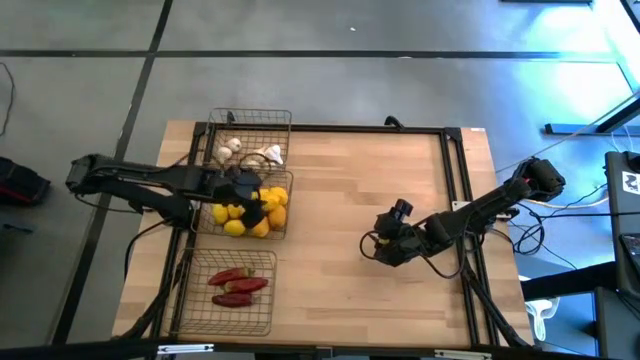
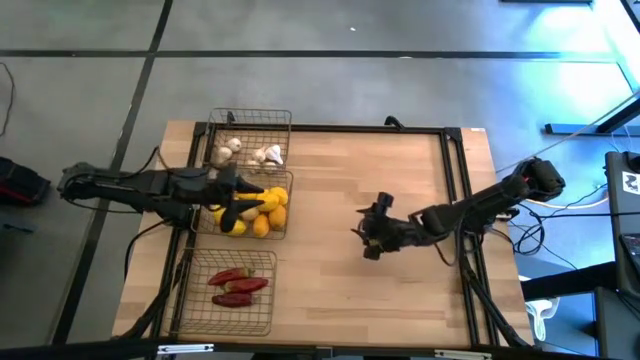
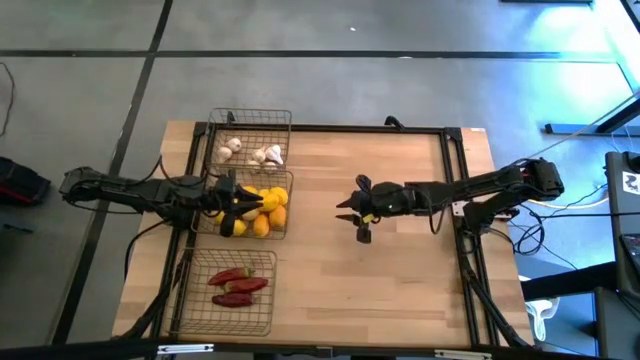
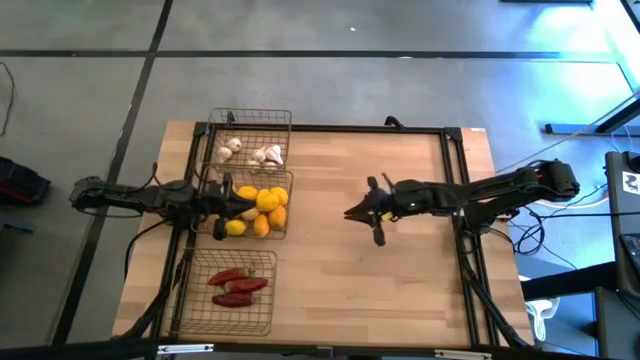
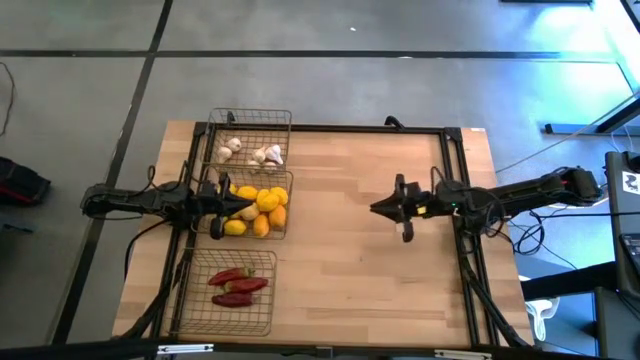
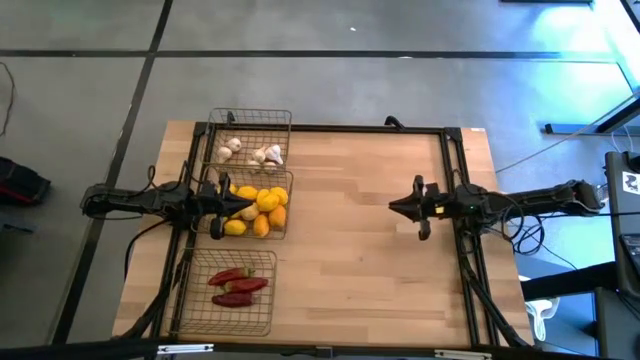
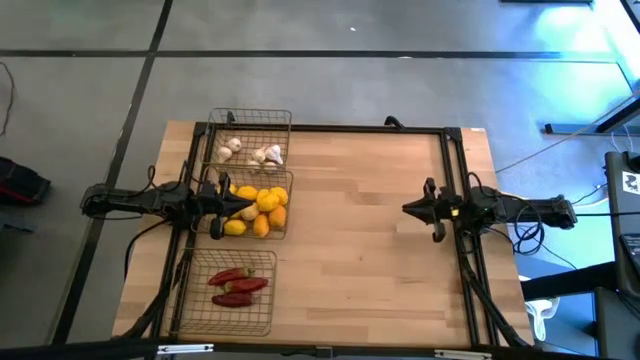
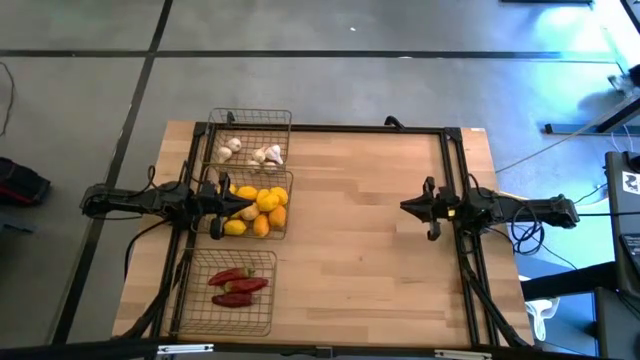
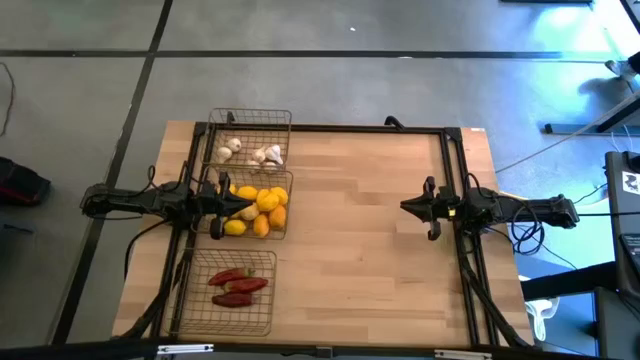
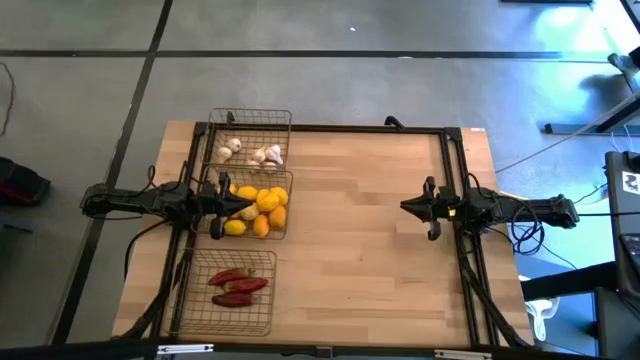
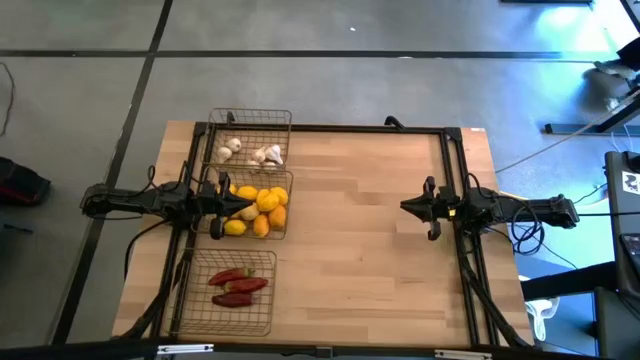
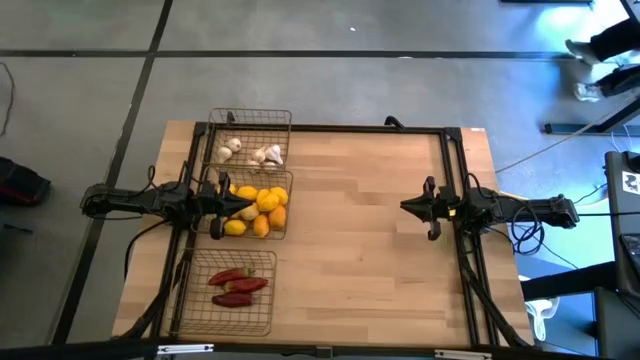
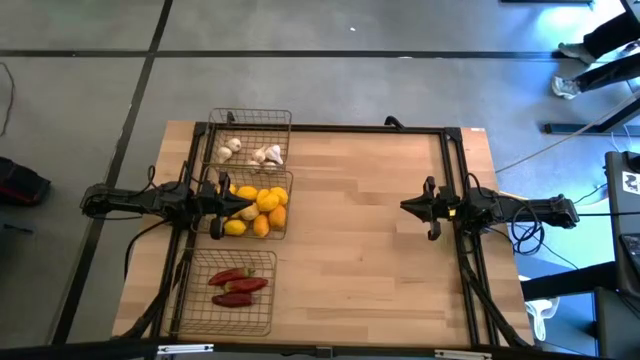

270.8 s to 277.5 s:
Task: Sort produce into baskets
Return to Home Position

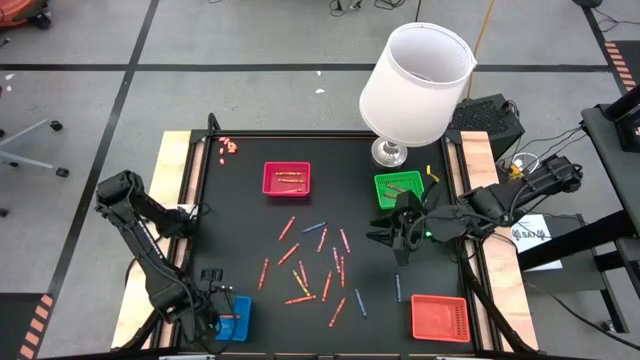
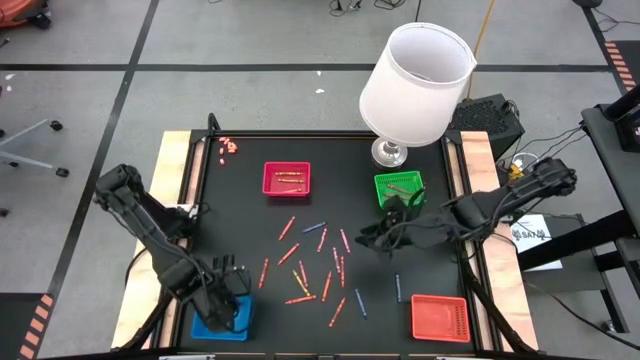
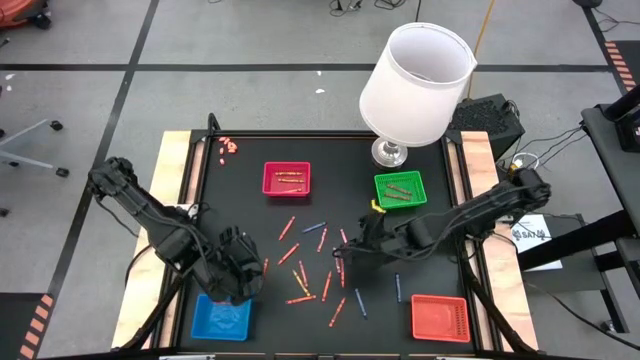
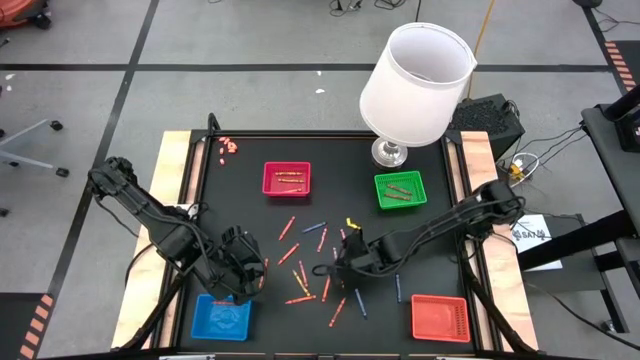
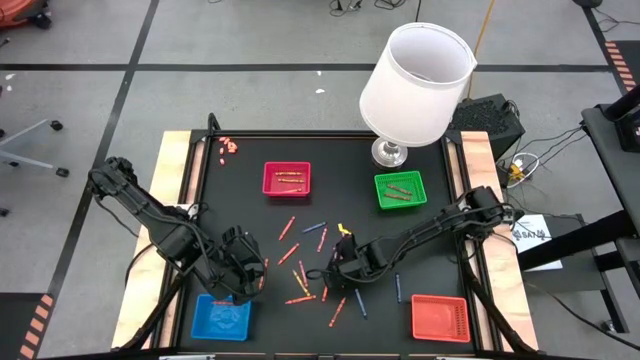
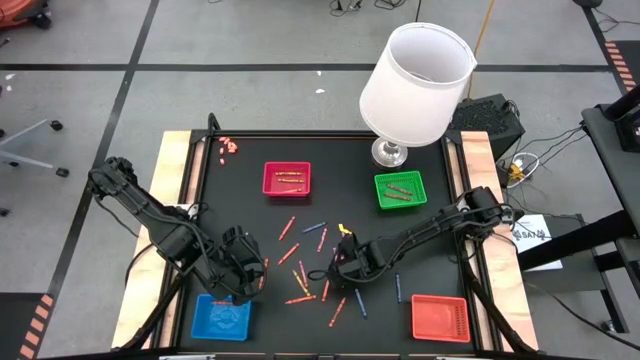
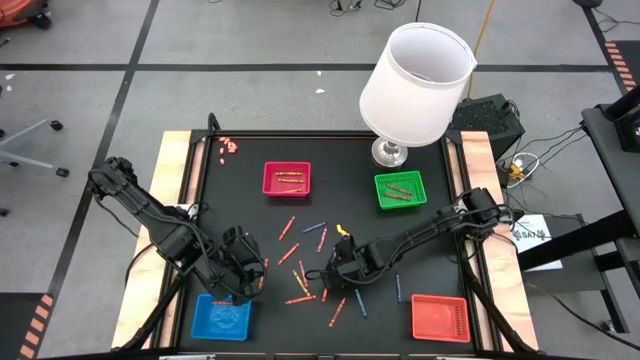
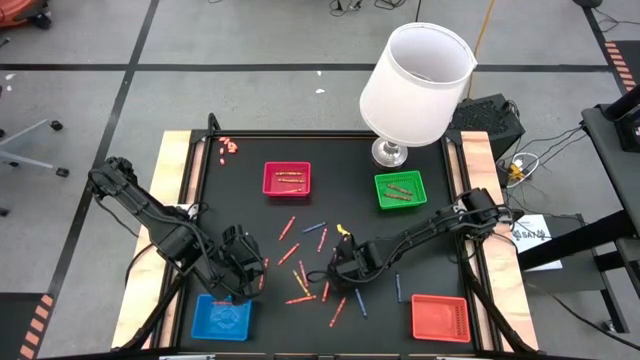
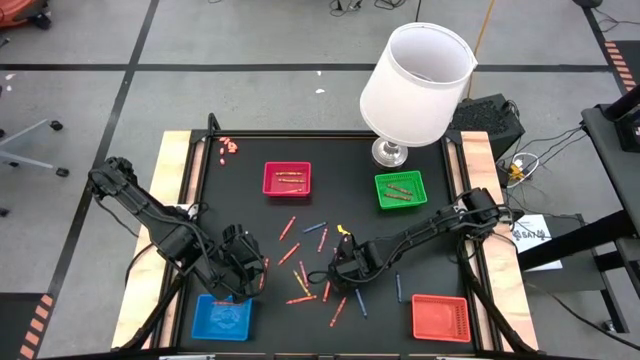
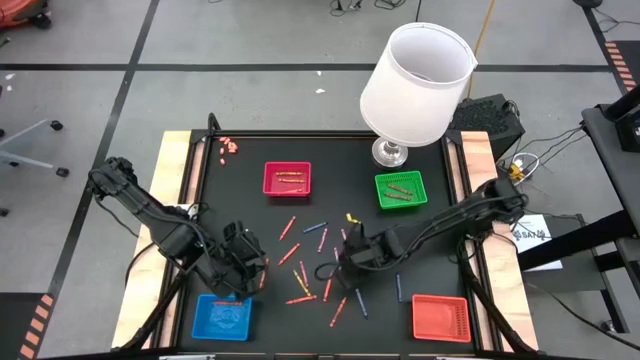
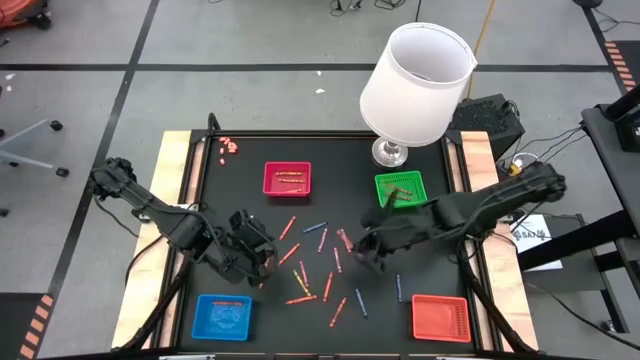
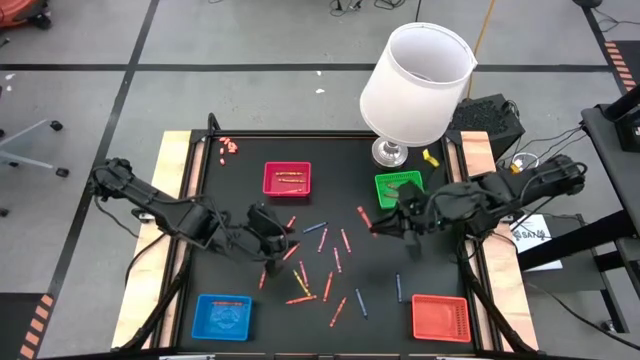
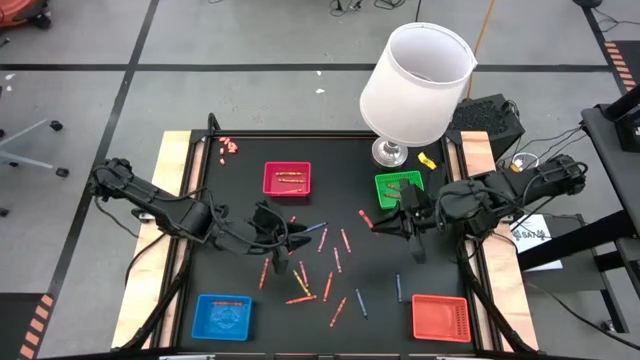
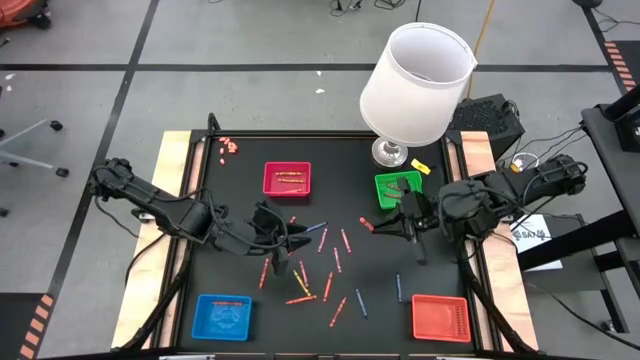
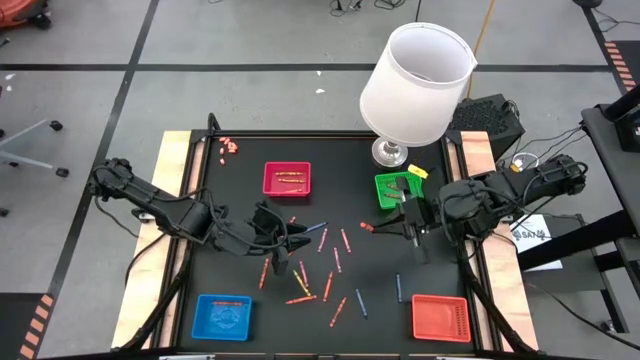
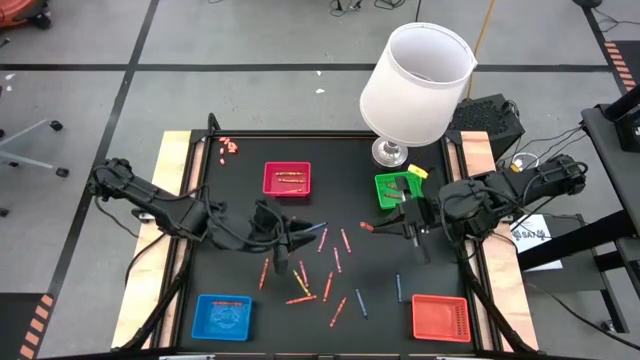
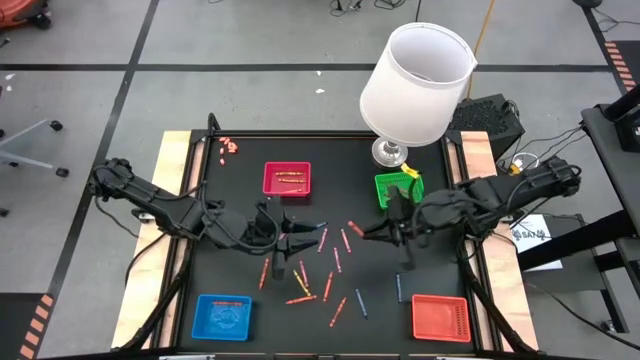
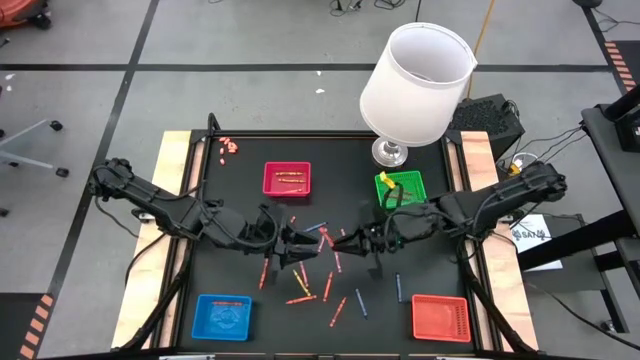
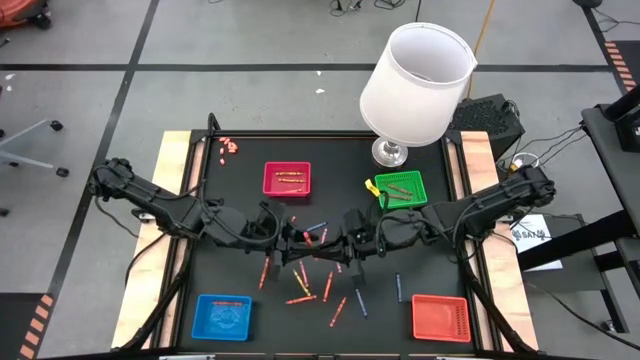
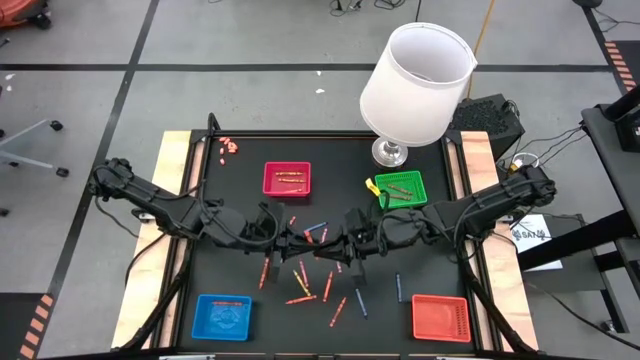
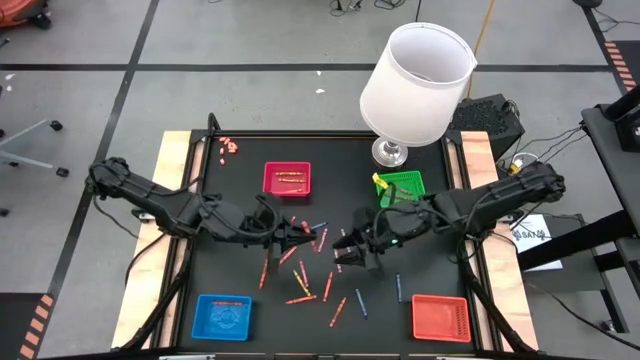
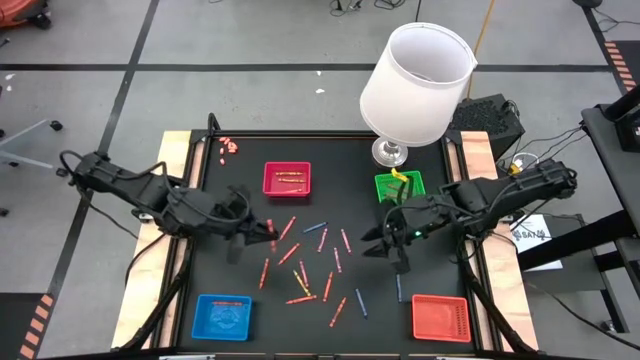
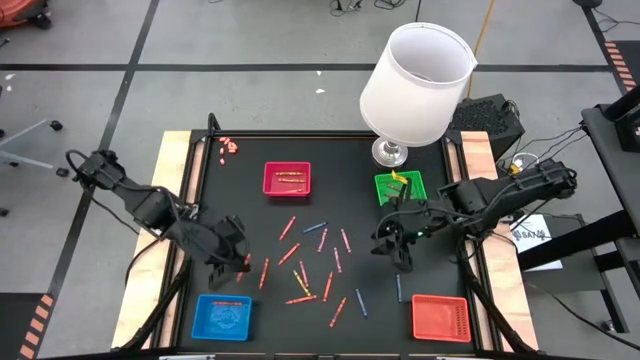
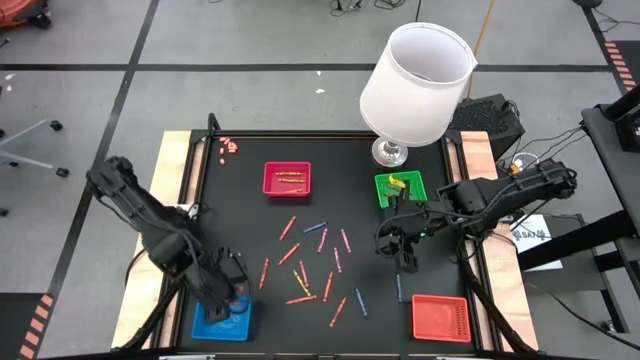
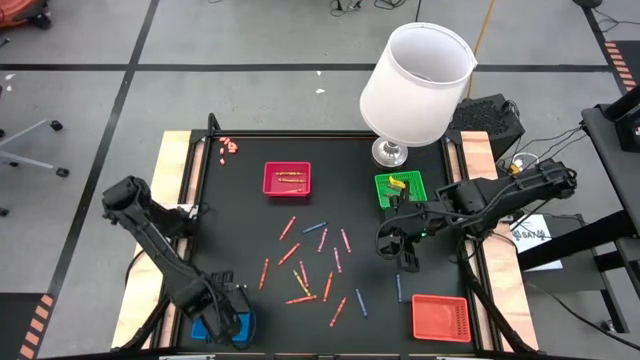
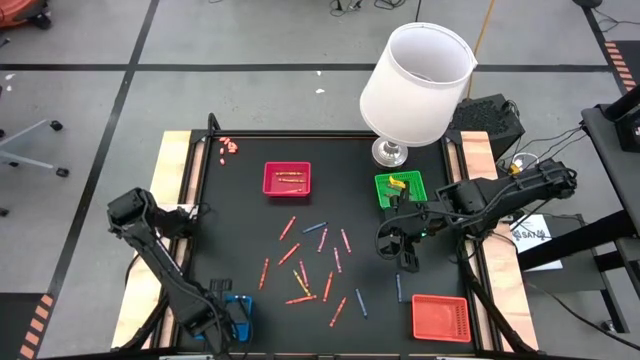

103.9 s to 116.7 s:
Task: Sort crayons
Put the orange crayon into the blue basket
